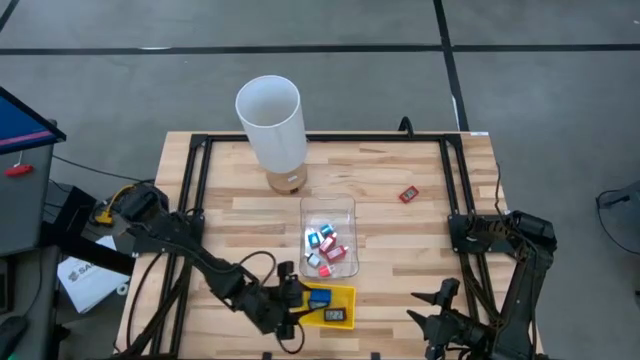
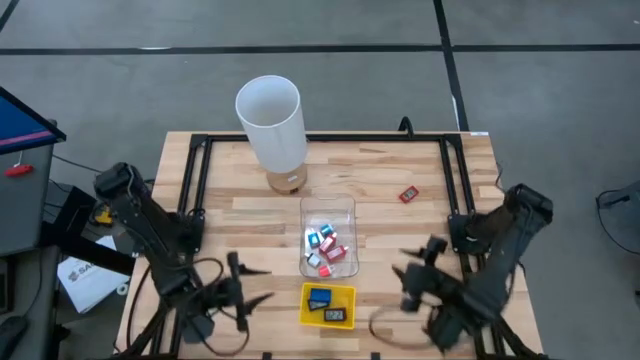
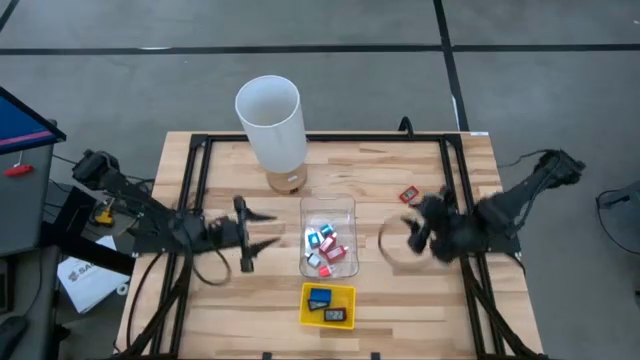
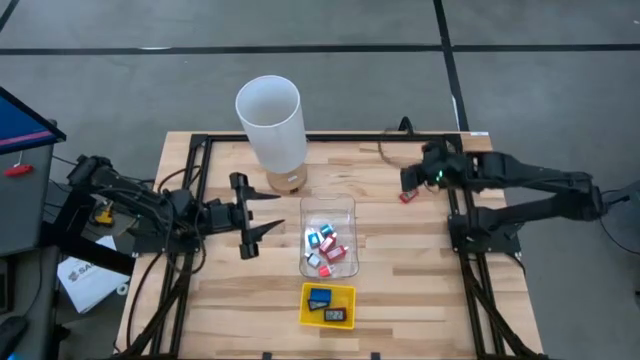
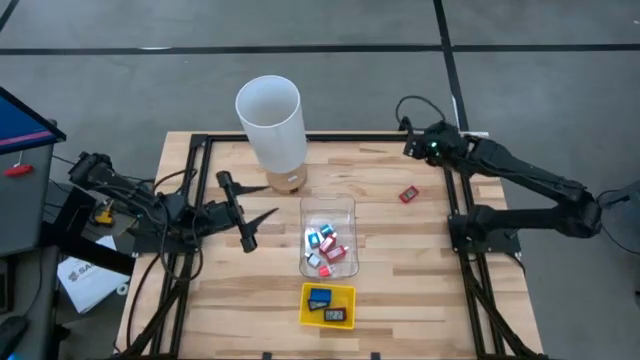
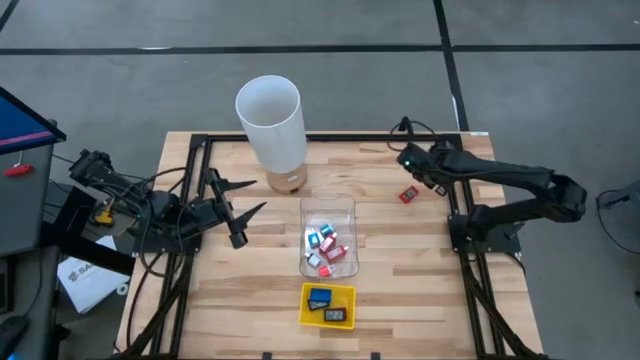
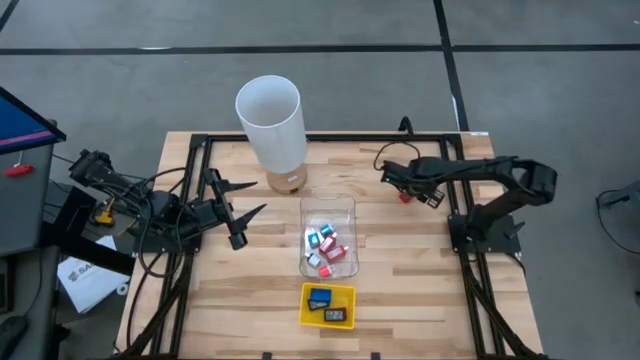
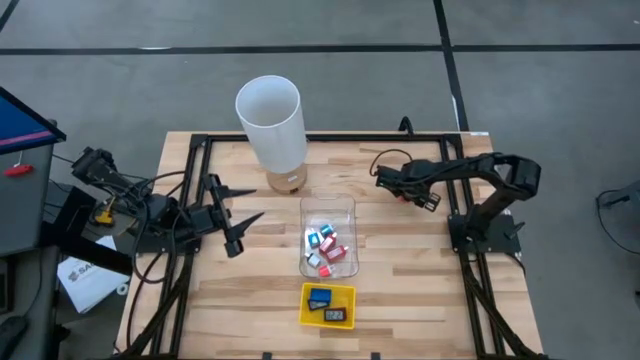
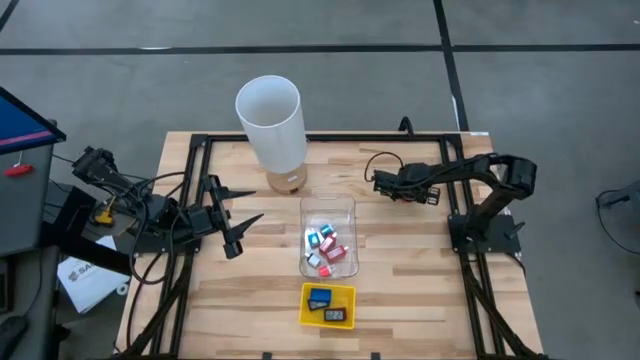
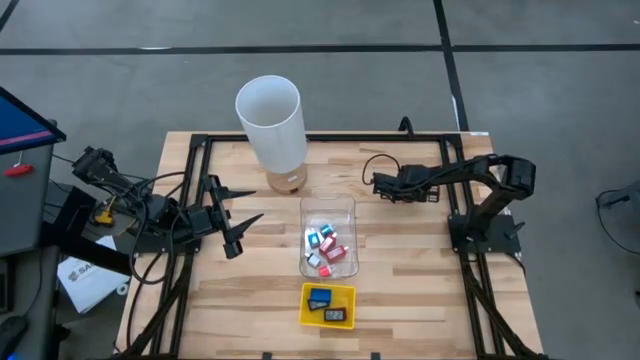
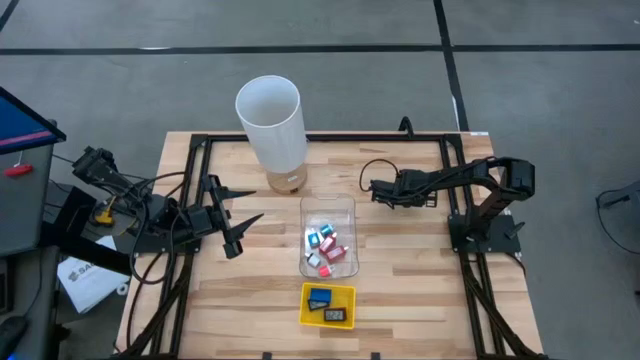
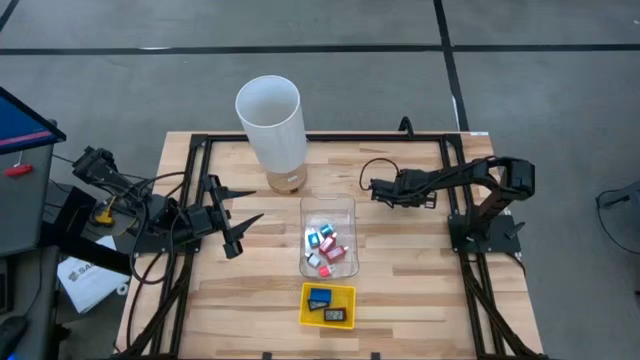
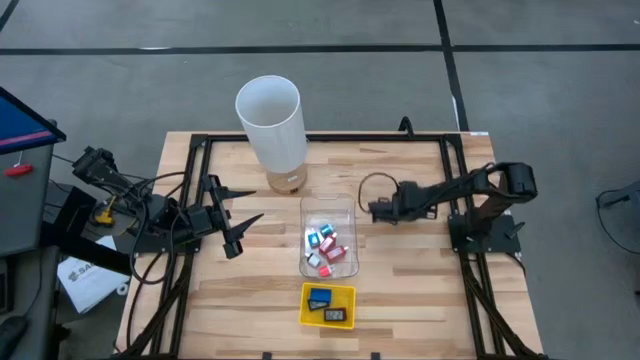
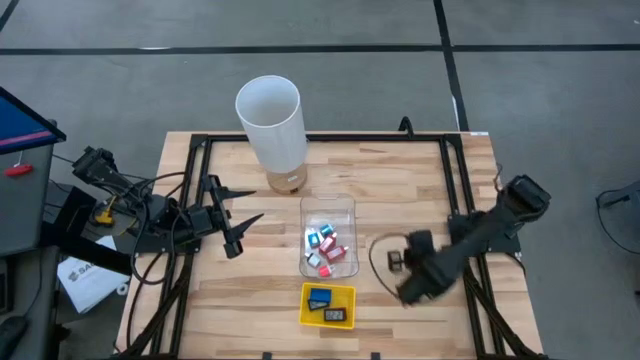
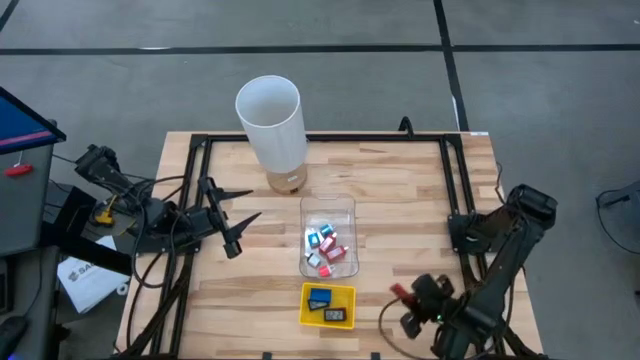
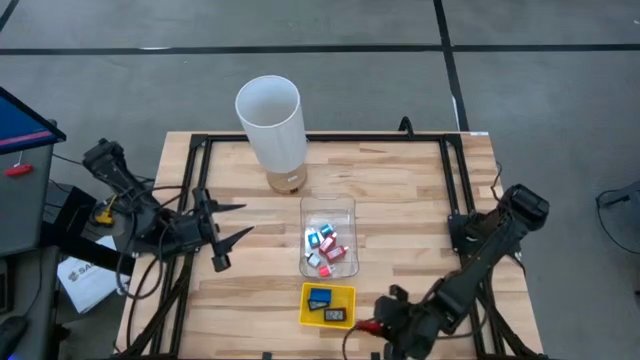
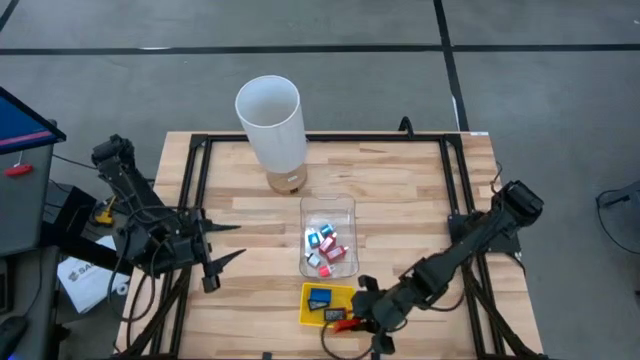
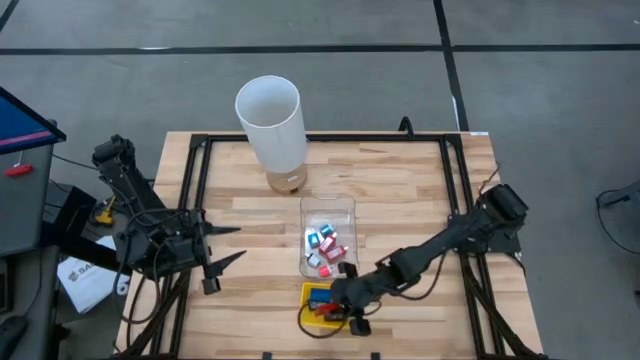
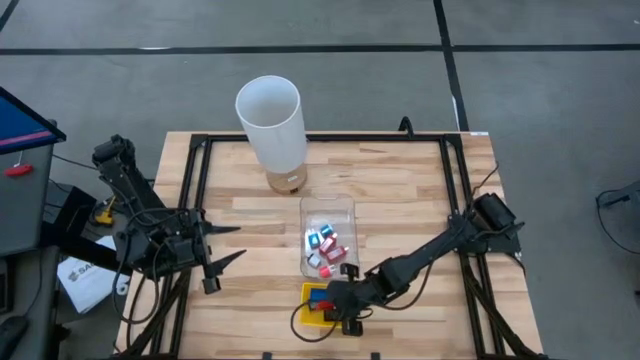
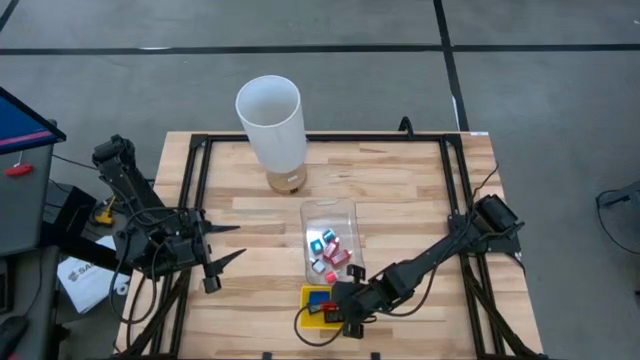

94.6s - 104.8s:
Task: Pick & Place Office items
Put the red digital clock into the yellow bin

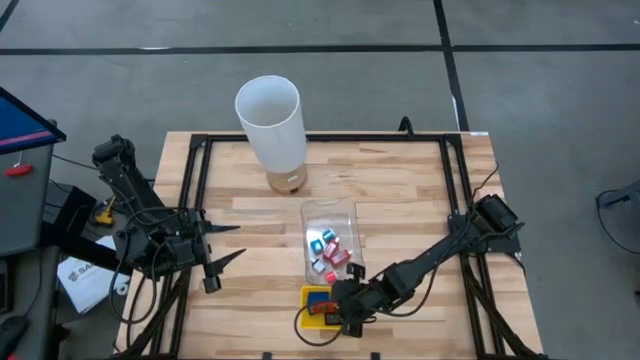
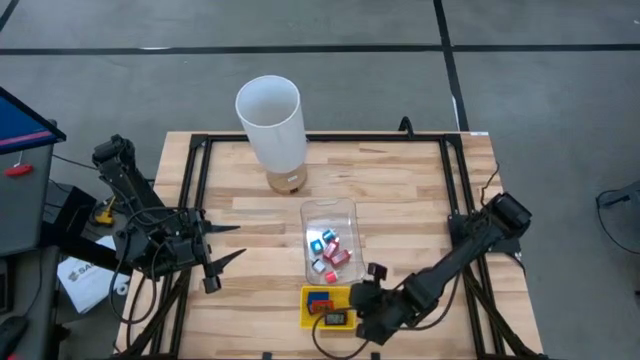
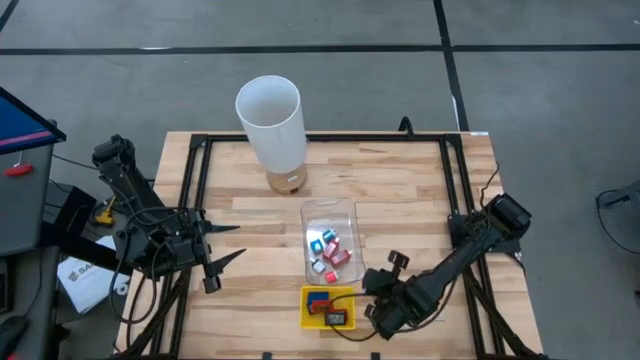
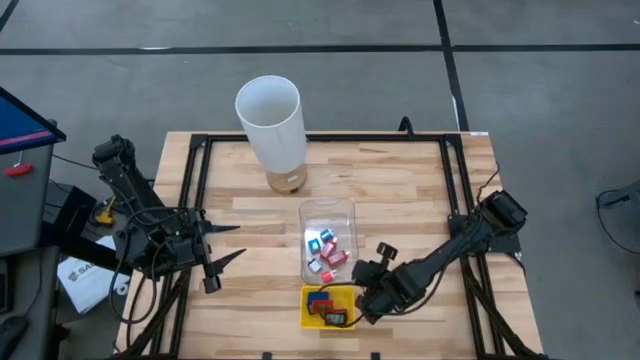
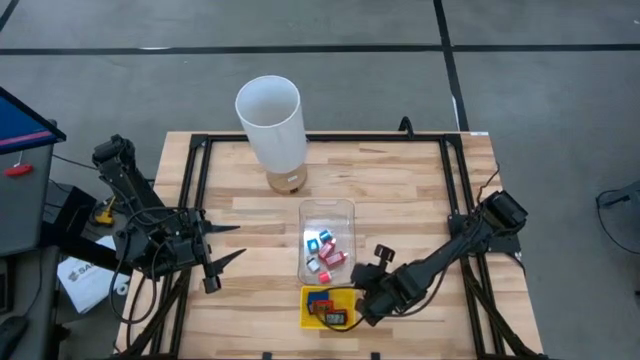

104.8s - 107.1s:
Adjust the transparent bin

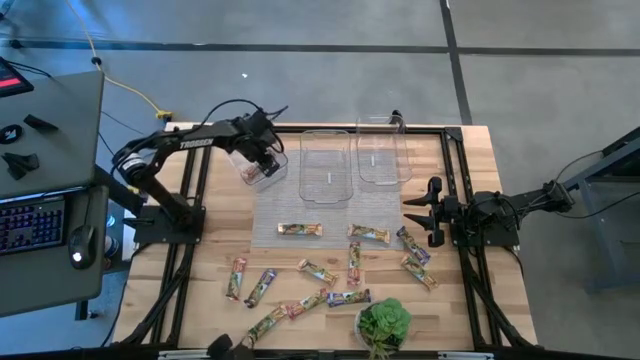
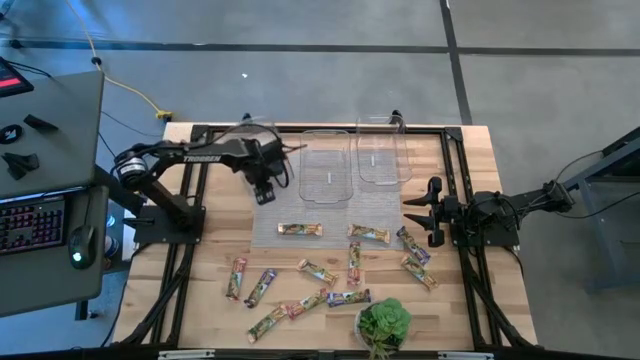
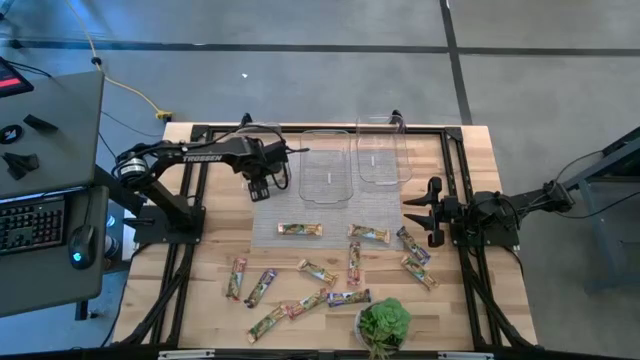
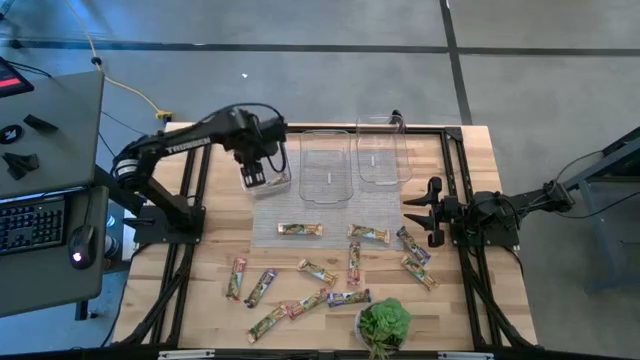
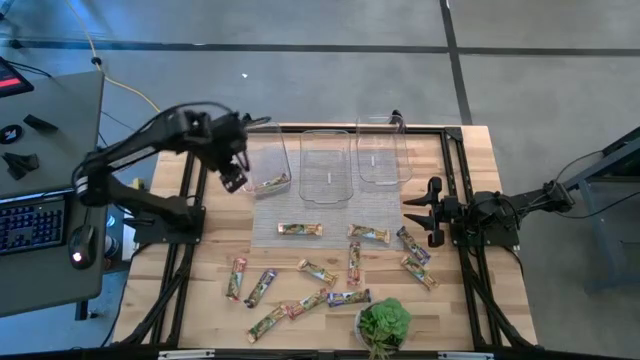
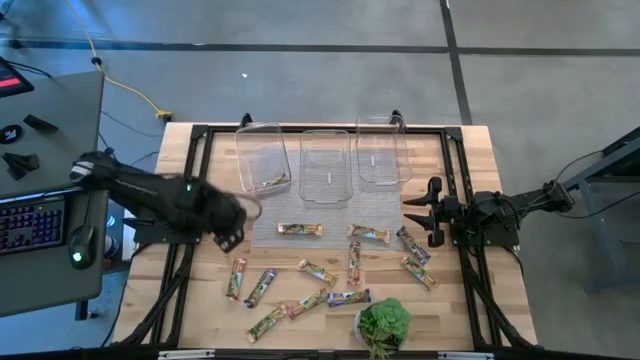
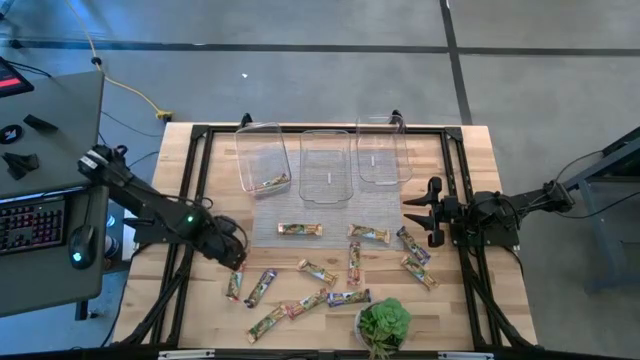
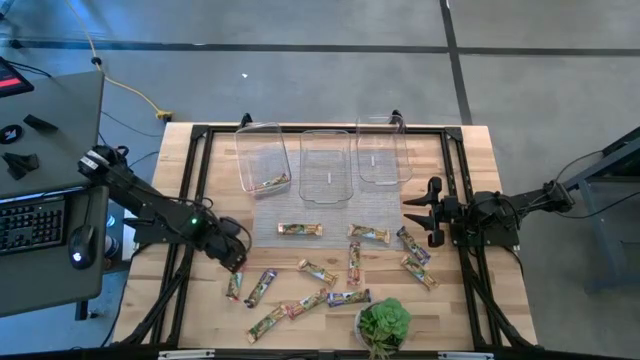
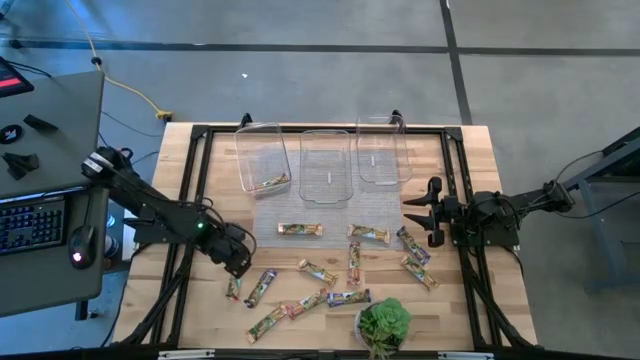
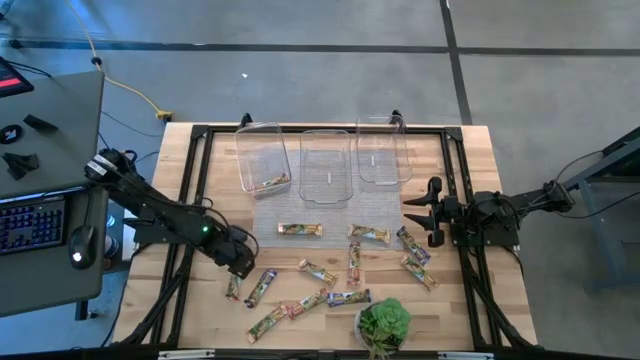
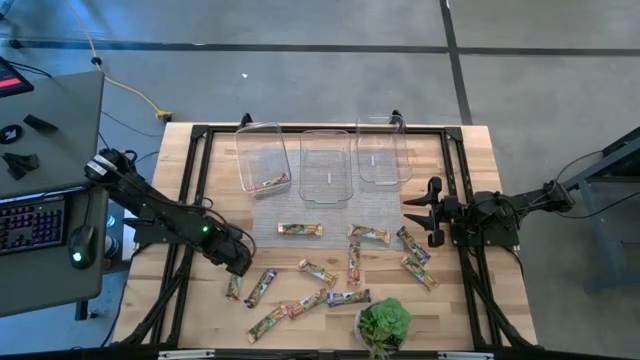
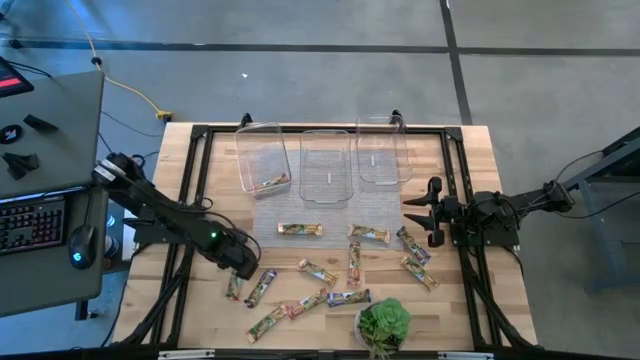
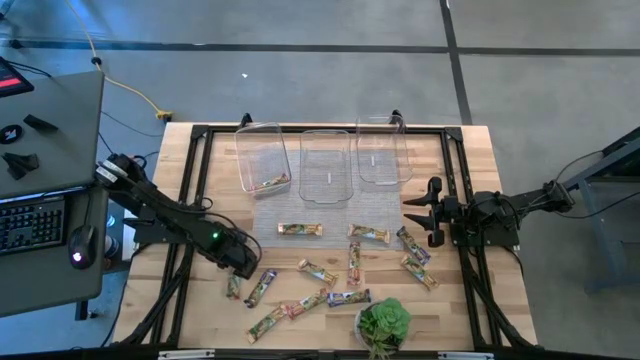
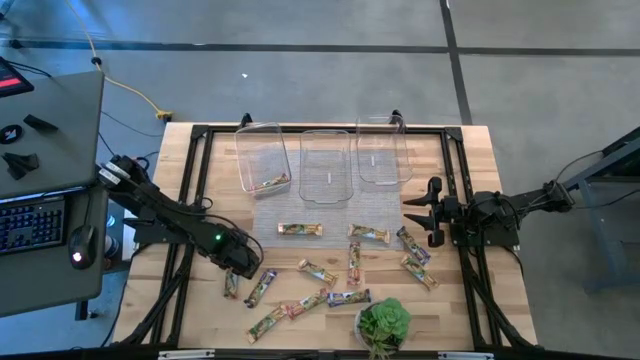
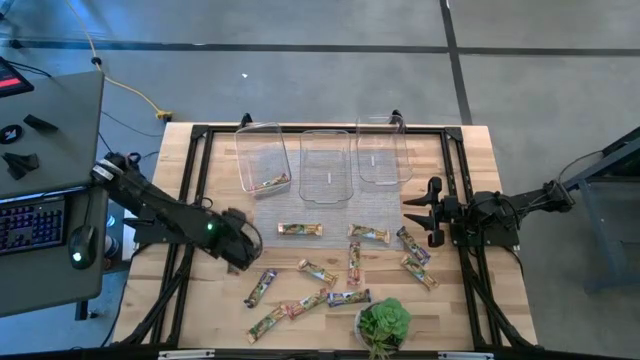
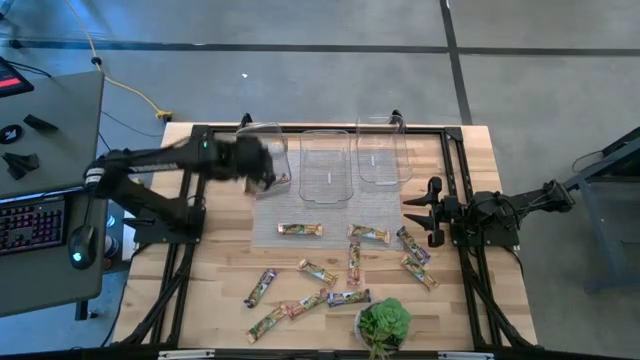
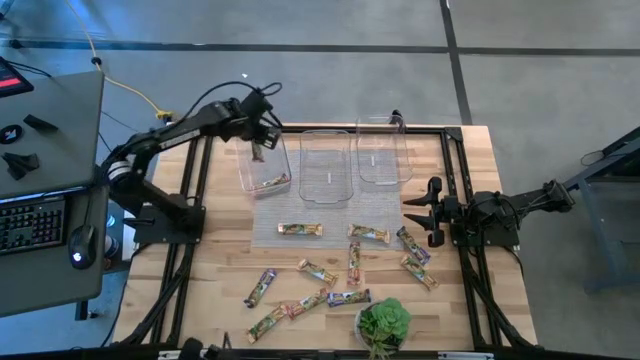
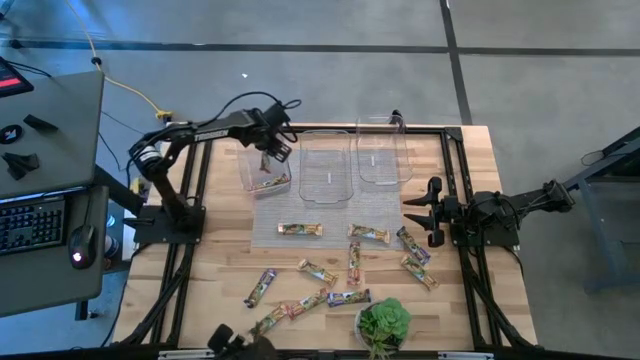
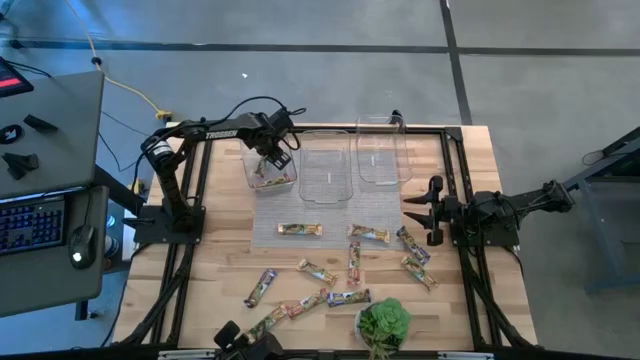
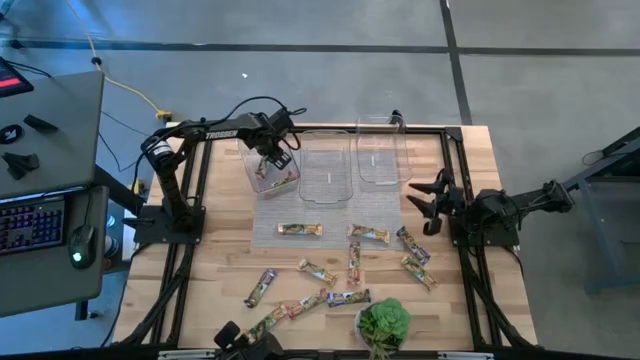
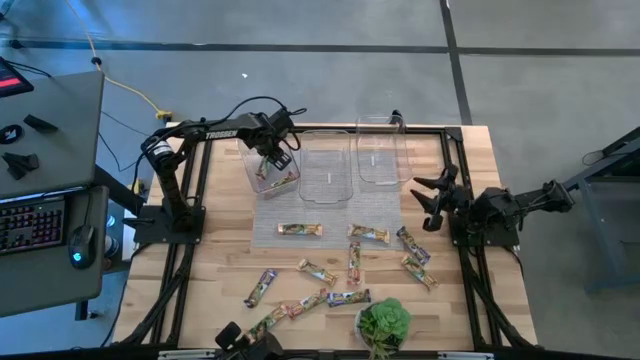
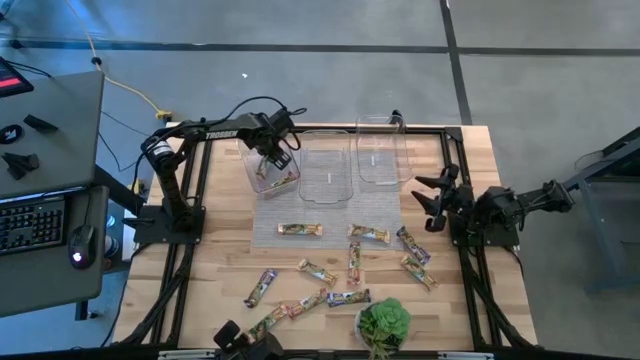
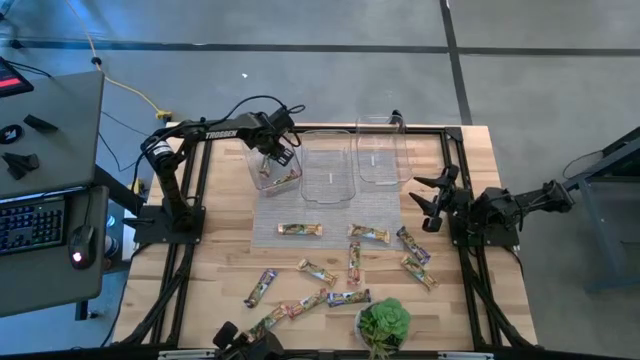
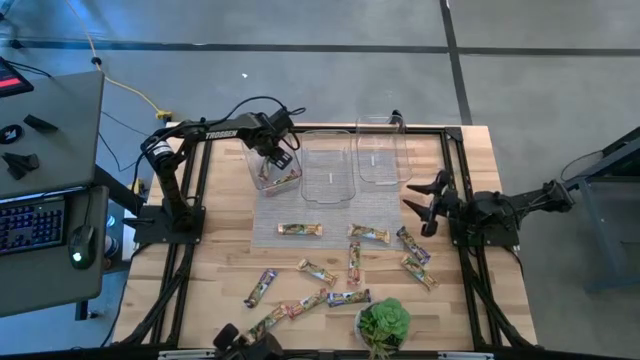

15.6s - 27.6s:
Task: Pick and place Granola Bars by type
Put the red granola bar into the left transparent bin
